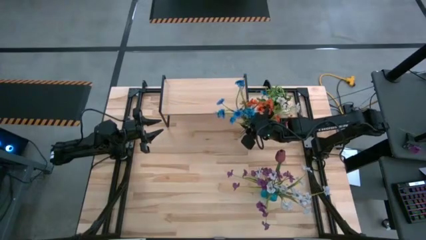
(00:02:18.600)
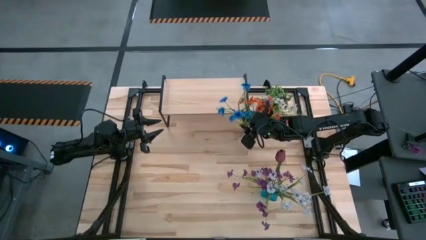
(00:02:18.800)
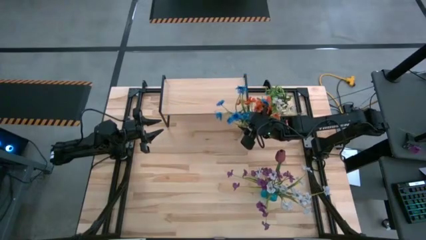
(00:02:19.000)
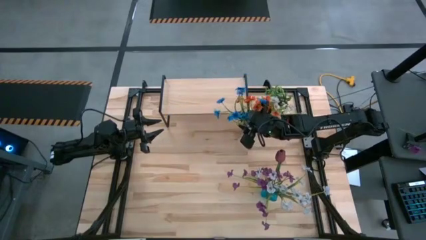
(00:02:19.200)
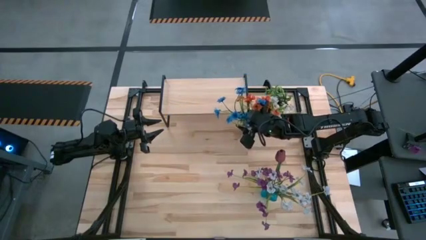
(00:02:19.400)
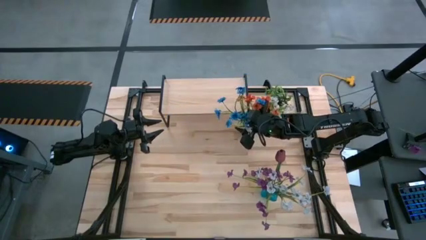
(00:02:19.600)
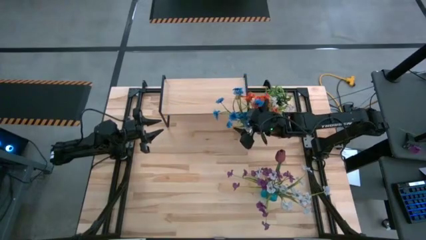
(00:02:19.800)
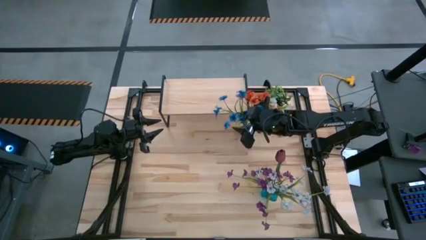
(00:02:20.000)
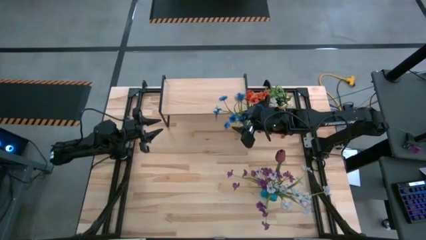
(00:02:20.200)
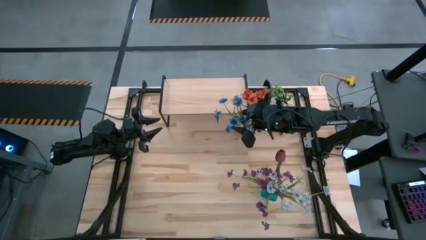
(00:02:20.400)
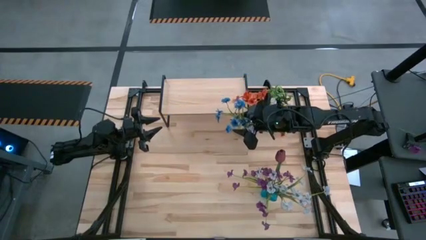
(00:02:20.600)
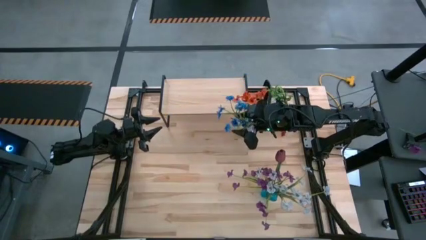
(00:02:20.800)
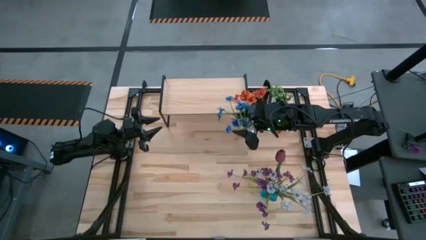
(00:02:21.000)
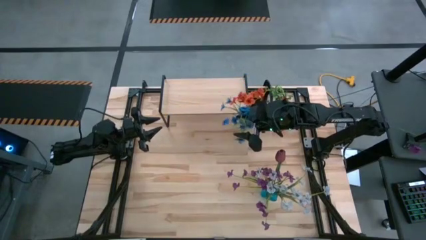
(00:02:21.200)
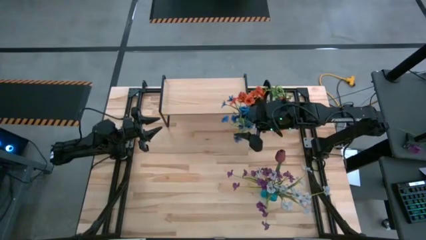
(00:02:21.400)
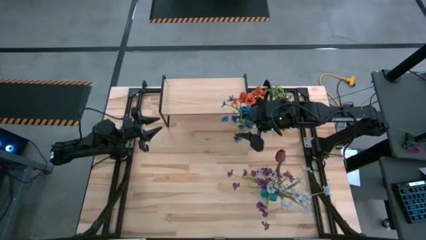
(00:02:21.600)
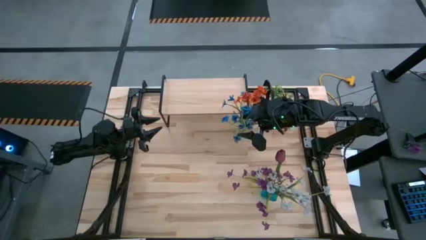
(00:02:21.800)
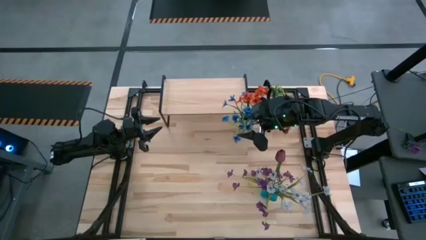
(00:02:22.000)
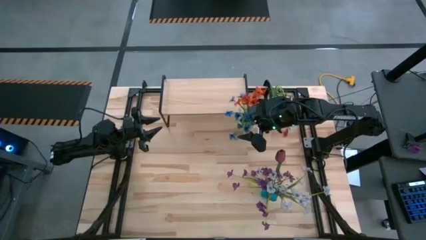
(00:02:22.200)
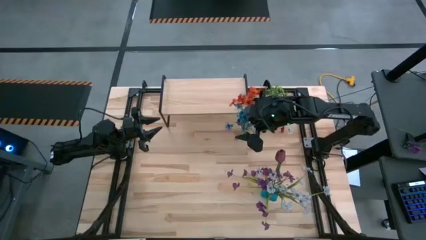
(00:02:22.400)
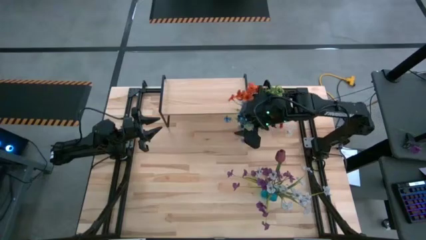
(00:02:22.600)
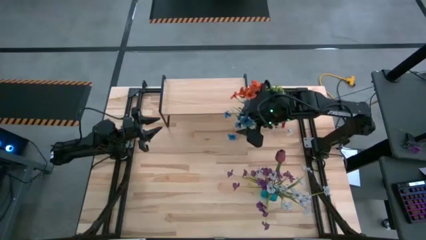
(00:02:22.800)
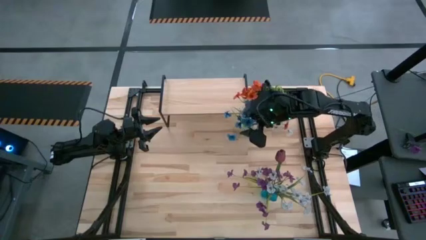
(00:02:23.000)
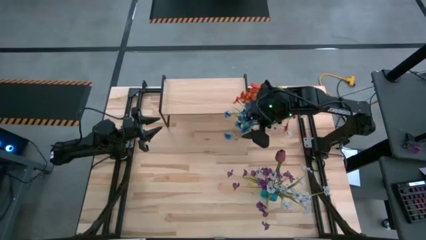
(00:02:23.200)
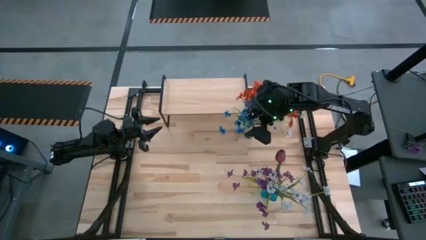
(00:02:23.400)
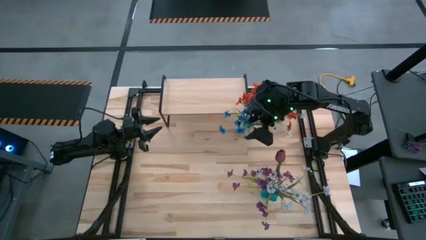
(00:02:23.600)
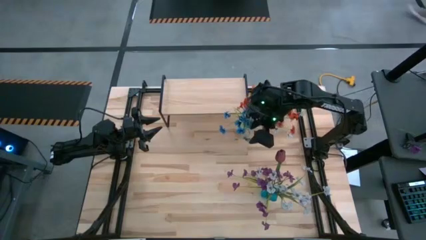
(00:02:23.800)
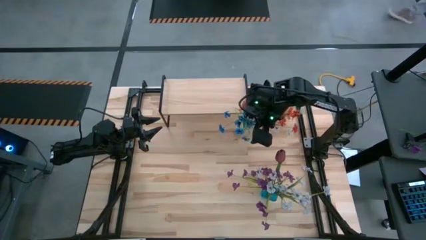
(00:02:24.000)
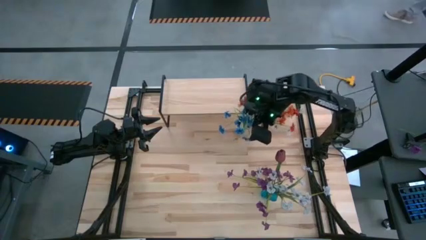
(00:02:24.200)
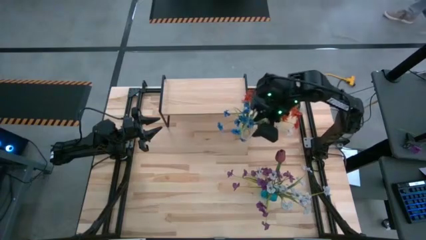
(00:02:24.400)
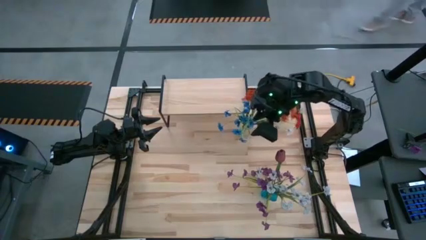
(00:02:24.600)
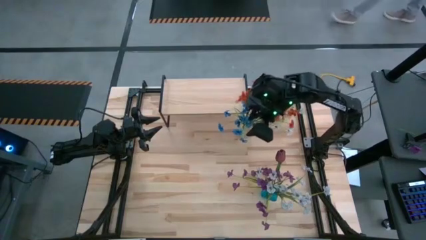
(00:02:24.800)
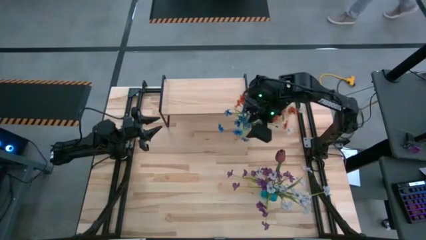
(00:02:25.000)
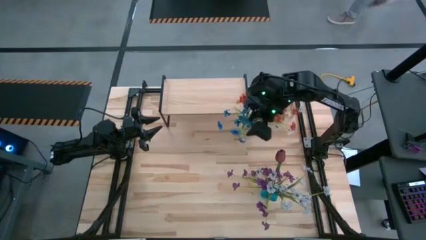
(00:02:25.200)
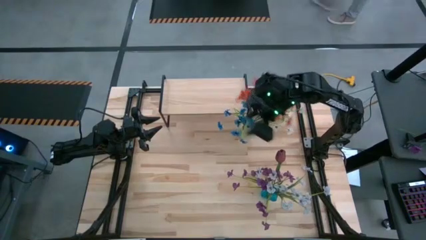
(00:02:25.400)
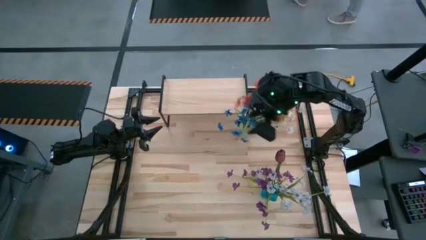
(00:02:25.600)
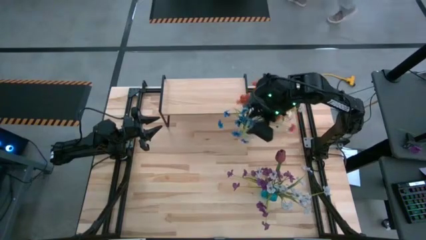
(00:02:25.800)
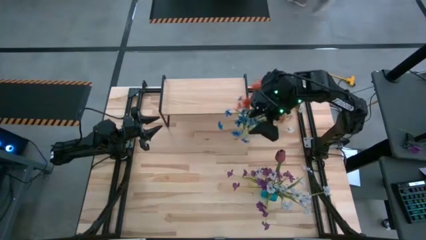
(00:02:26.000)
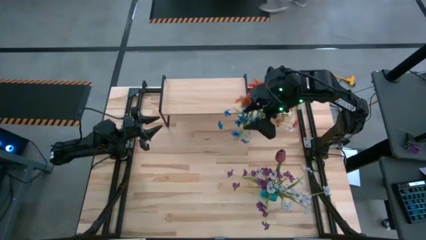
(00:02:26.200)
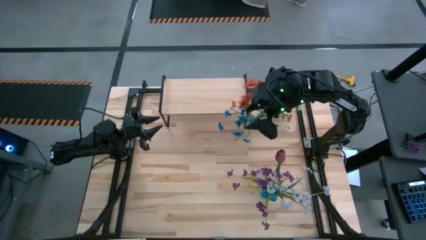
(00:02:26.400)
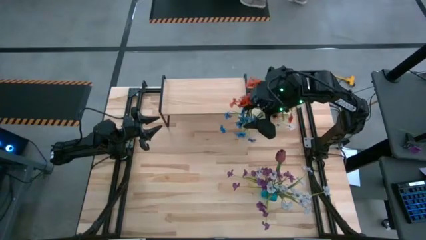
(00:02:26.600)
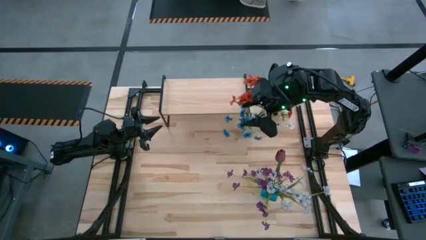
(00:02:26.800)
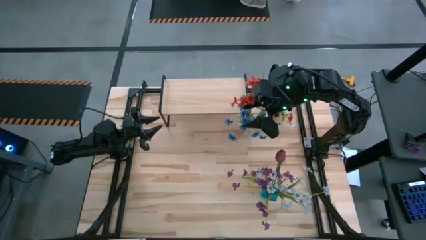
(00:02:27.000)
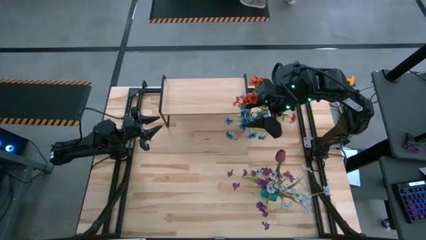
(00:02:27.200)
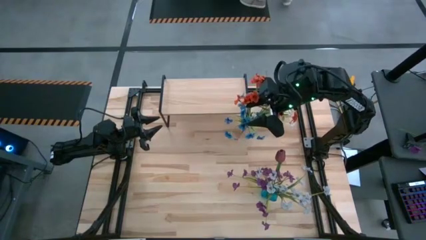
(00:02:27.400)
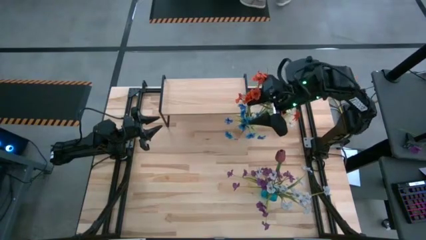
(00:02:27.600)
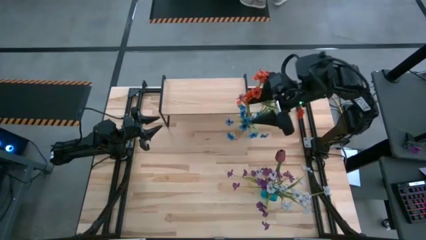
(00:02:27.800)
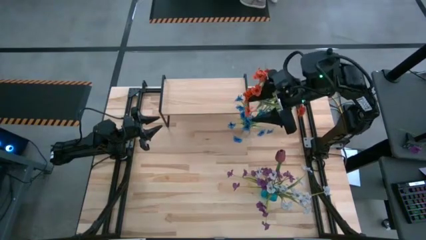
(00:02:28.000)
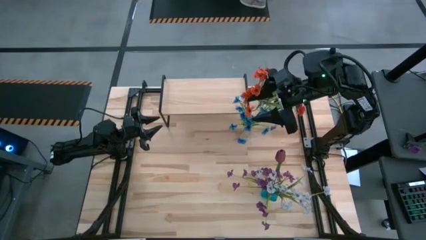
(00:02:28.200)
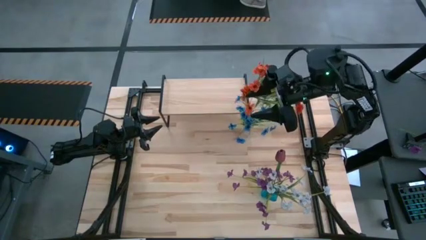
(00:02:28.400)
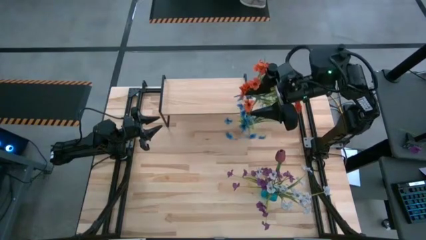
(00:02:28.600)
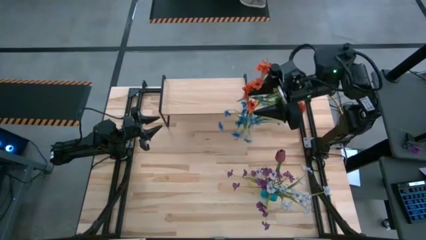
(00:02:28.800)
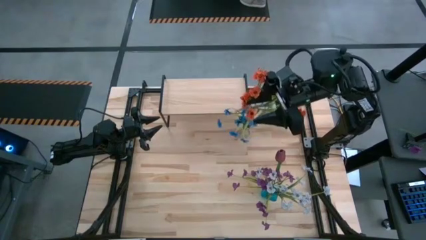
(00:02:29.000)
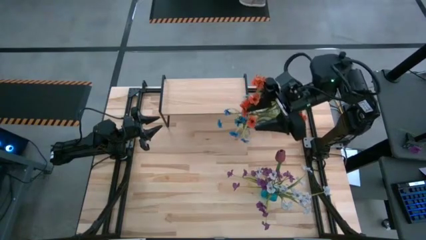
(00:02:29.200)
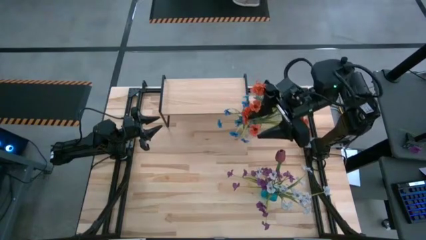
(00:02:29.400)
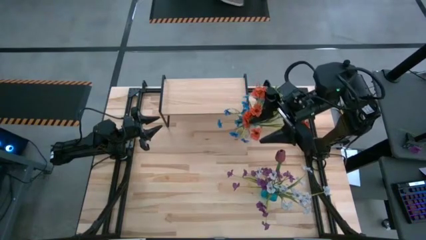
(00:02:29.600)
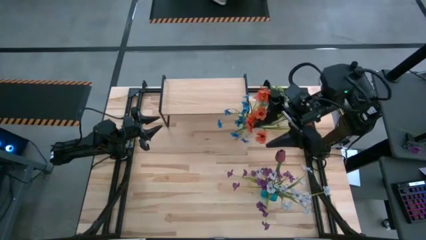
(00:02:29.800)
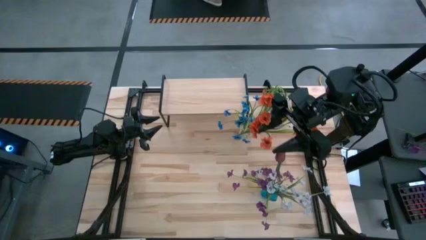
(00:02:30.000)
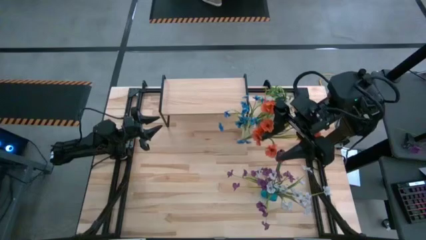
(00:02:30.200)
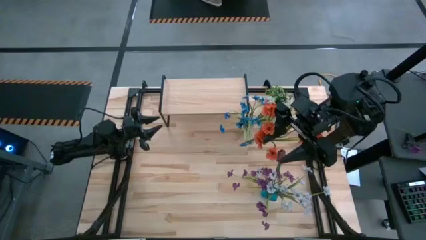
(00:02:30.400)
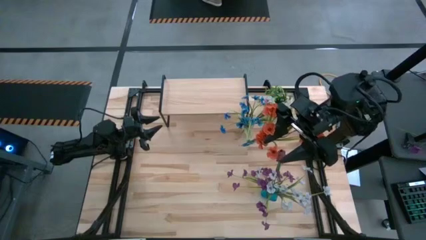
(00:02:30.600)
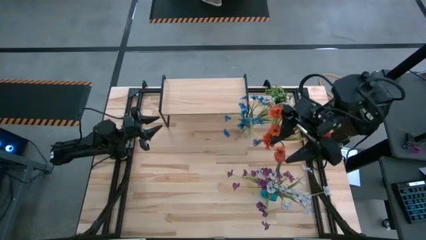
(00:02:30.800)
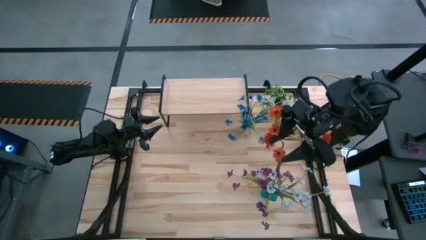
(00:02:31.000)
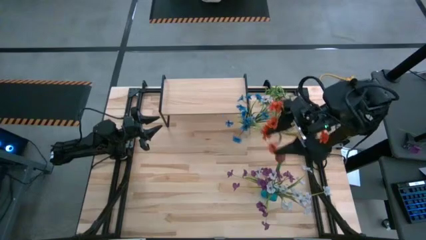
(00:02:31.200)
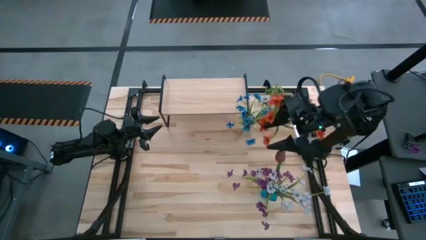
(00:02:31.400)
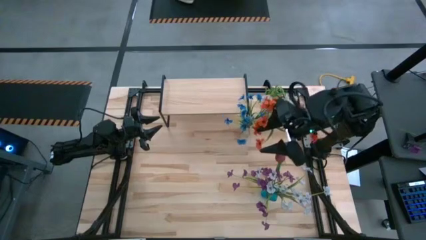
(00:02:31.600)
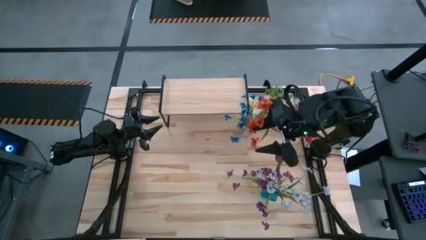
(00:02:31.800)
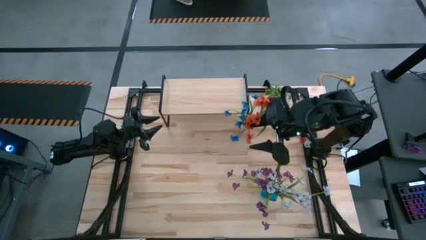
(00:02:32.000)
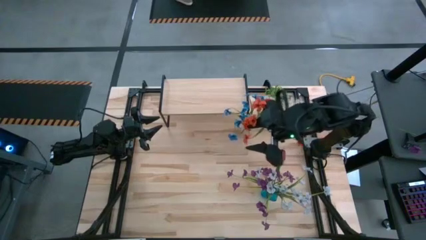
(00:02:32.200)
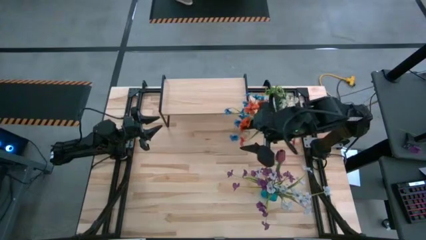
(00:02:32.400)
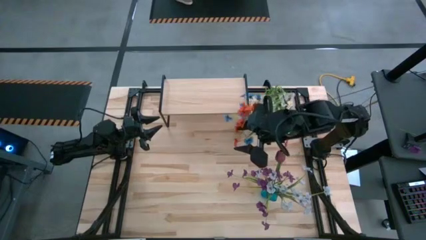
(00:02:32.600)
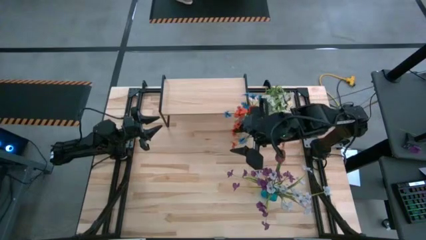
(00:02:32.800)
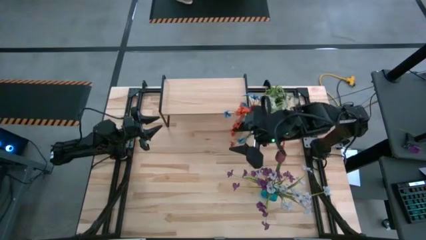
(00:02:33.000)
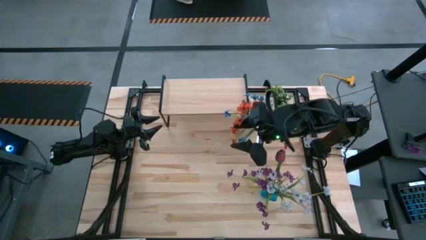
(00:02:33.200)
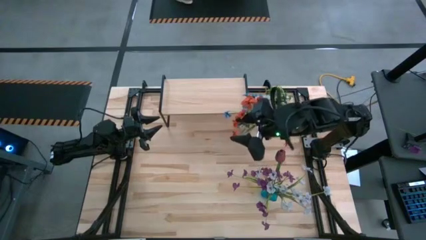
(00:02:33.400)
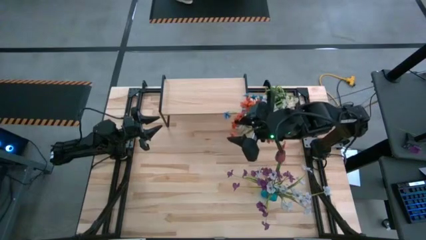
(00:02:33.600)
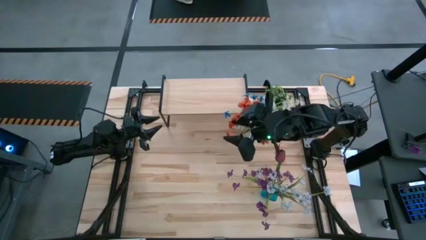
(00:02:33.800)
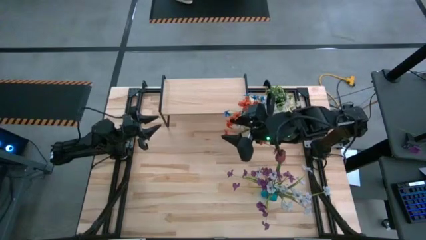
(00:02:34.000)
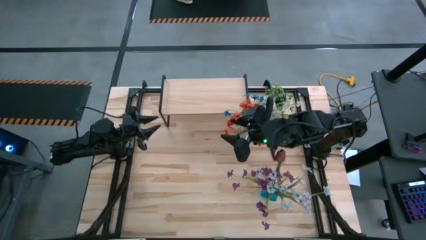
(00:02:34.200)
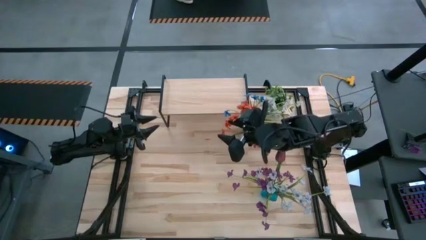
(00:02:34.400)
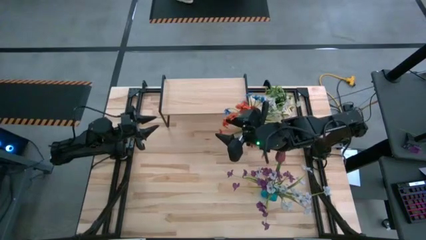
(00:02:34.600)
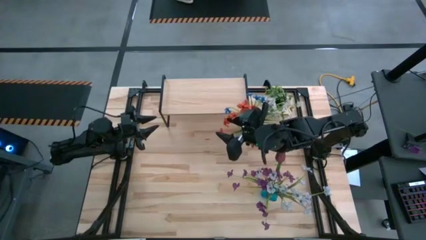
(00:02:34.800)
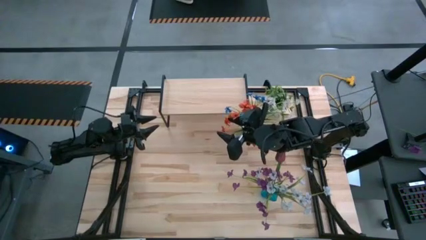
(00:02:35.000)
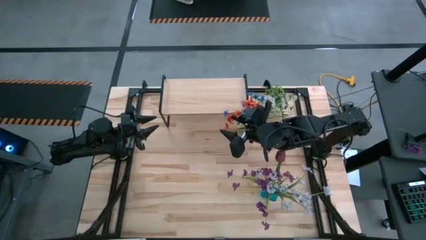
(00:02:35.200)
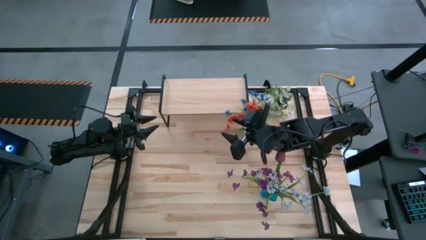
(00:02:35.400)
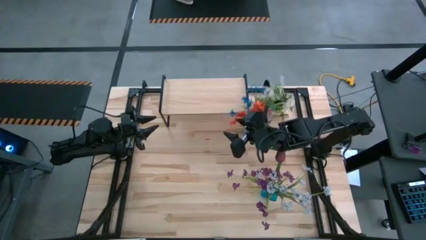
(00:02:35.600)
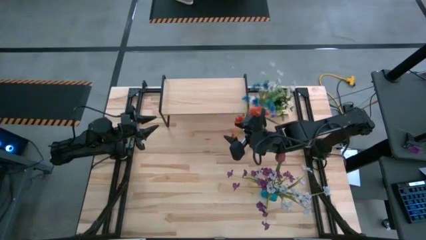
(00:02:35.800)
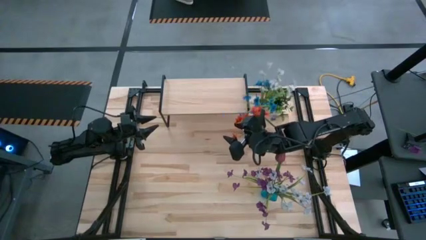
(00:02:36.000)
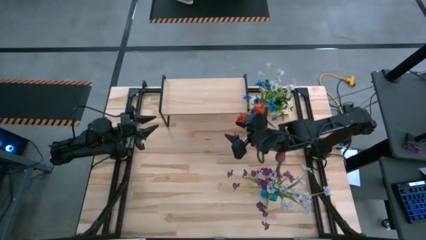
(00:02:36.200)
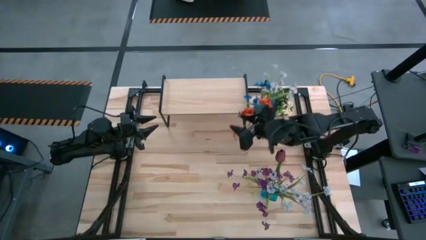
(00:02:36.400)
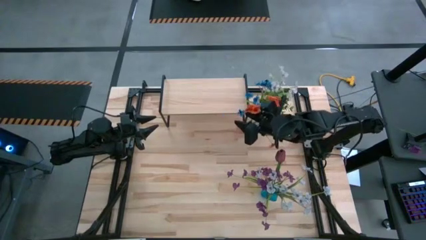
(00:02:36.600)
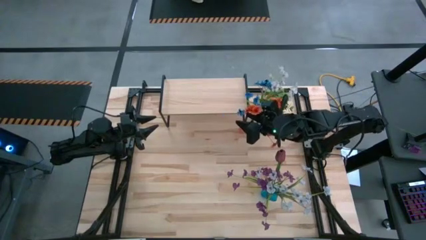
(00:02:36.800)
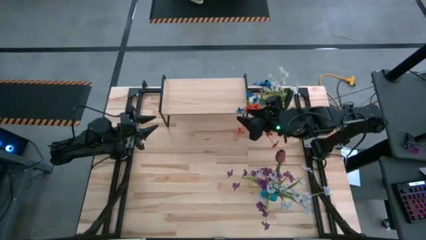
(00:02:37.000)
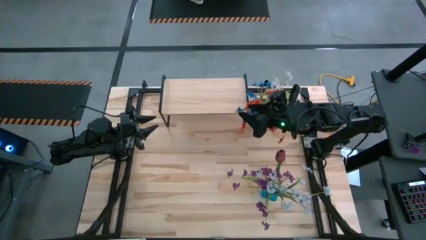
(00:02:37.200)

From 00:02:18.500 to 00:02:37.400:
Task: Pick and place flowers into a vace then onto a shelf
Adjust the orange flowers on the transparent flower vase
